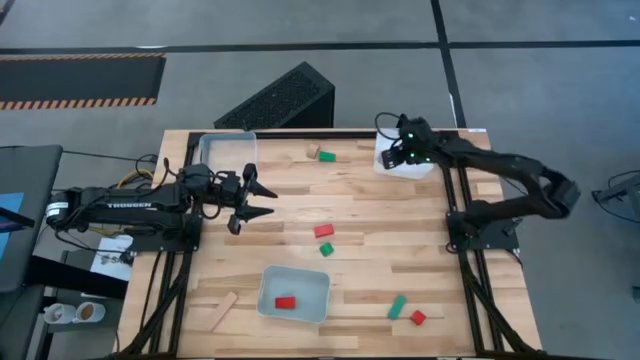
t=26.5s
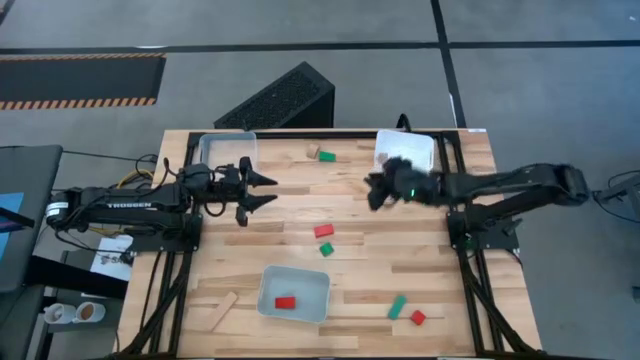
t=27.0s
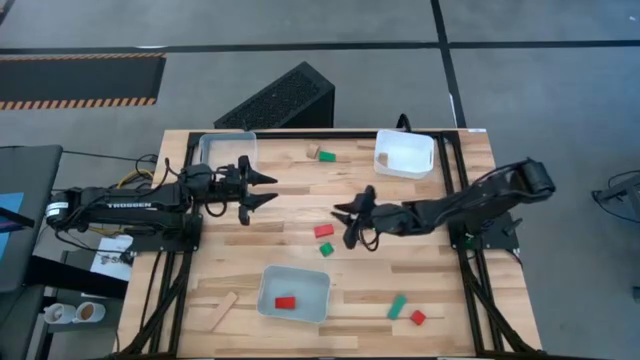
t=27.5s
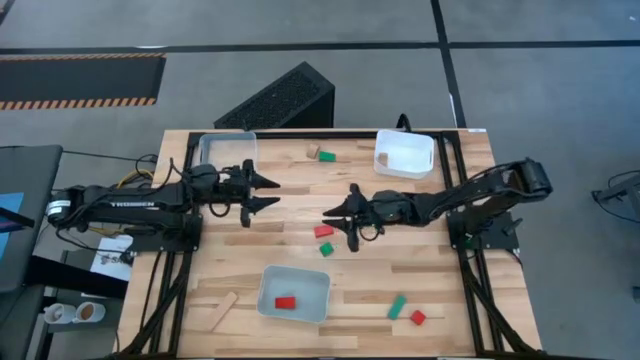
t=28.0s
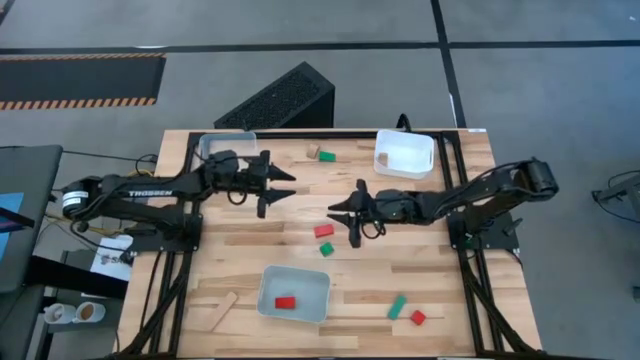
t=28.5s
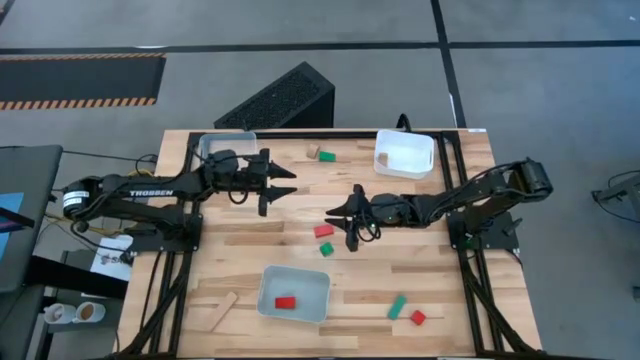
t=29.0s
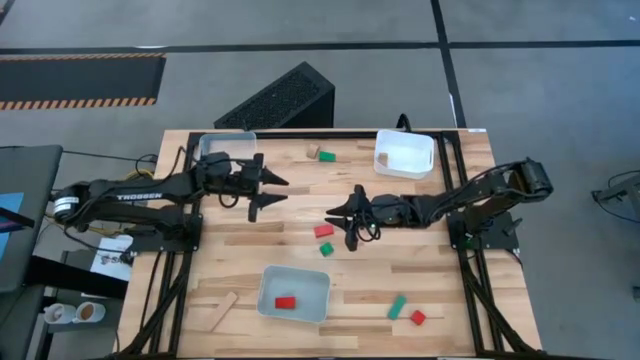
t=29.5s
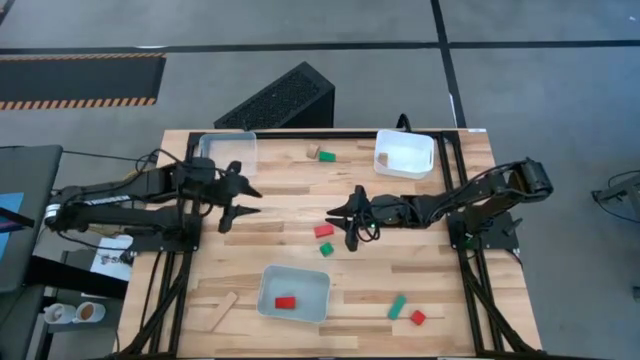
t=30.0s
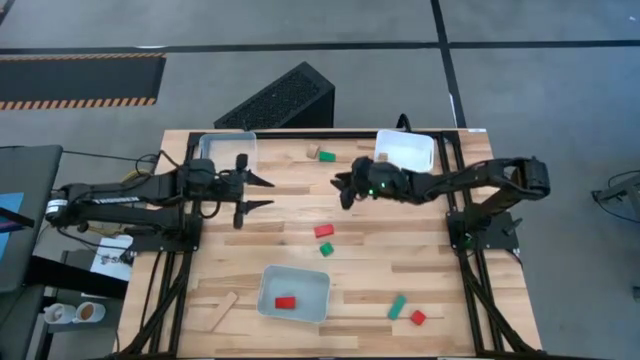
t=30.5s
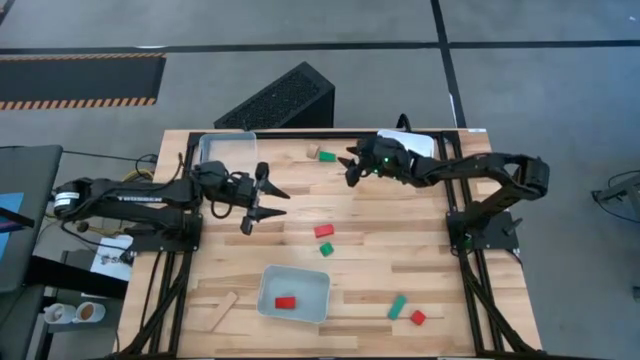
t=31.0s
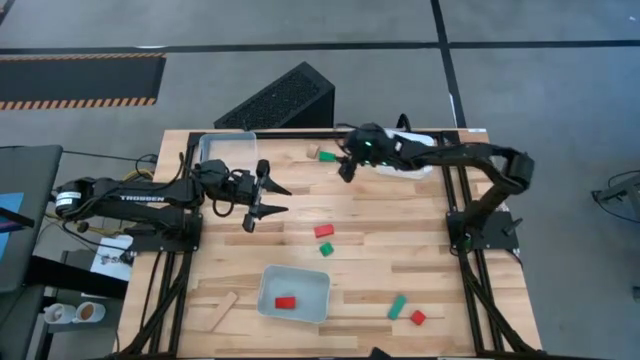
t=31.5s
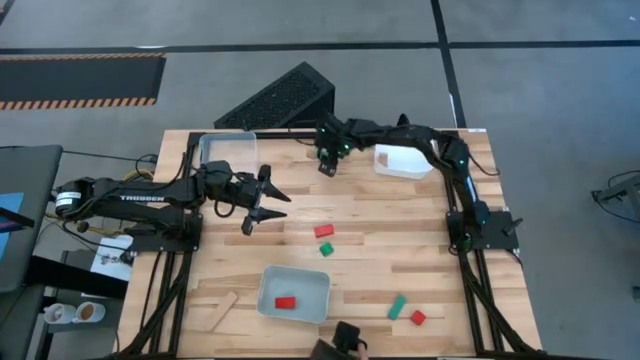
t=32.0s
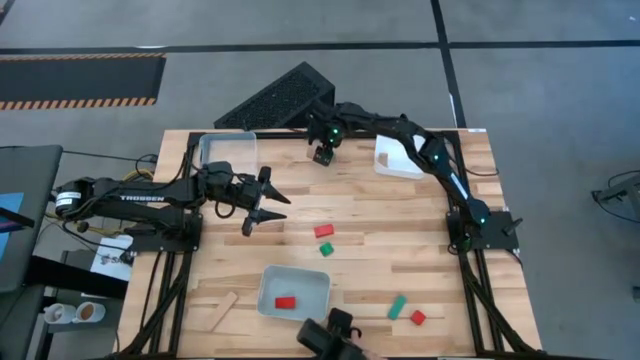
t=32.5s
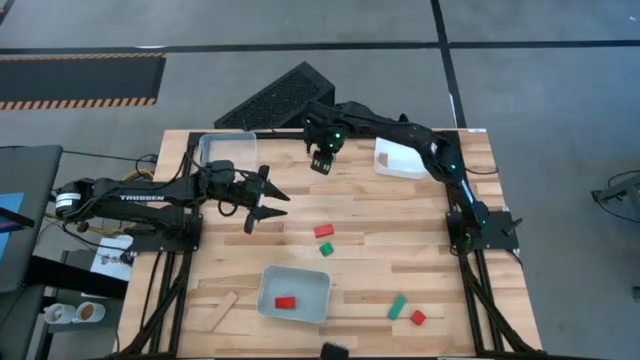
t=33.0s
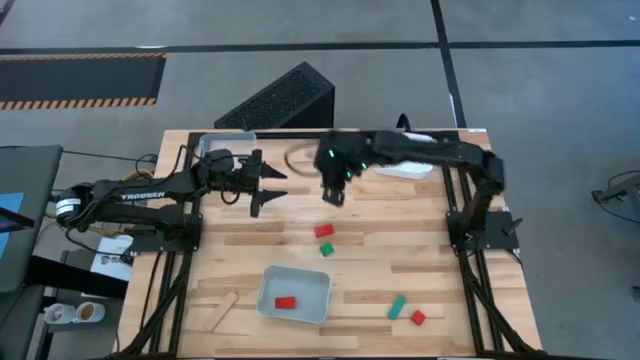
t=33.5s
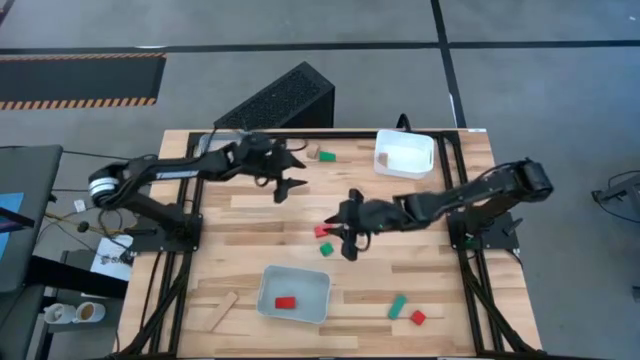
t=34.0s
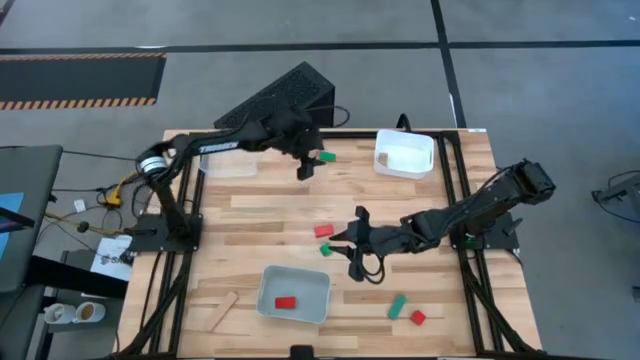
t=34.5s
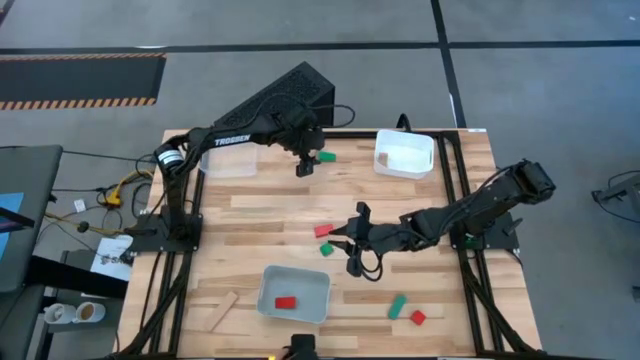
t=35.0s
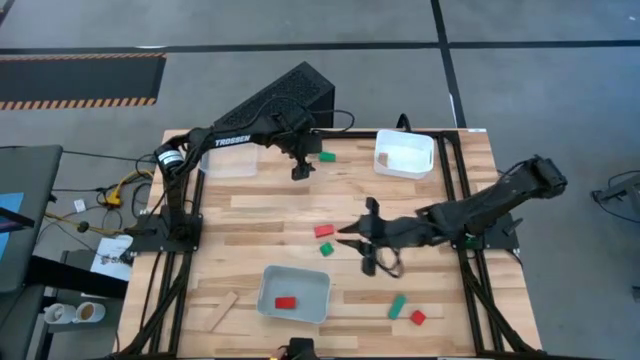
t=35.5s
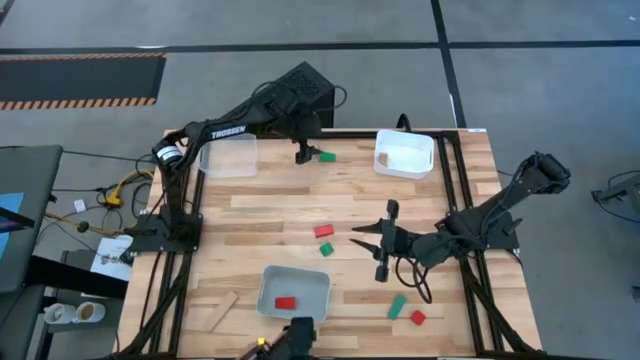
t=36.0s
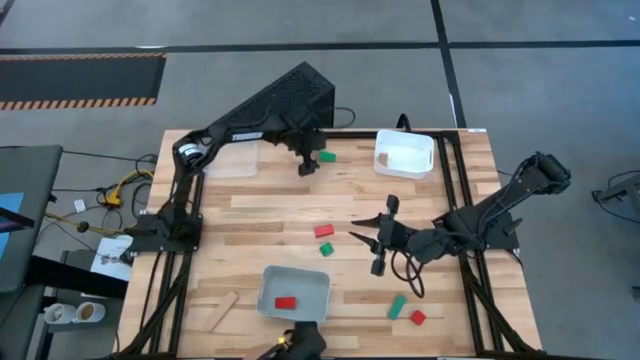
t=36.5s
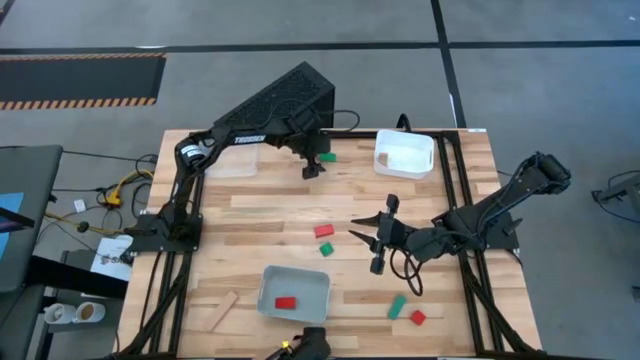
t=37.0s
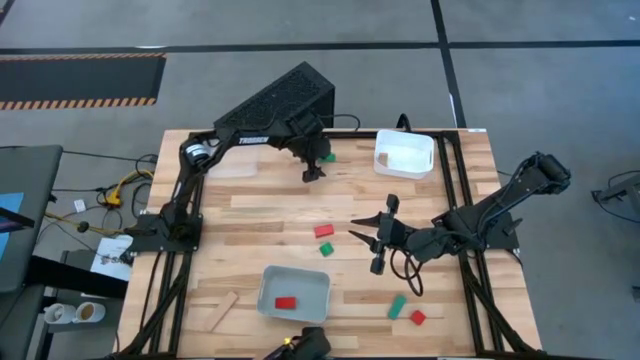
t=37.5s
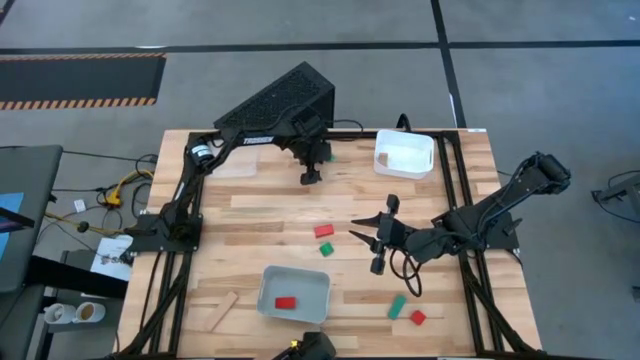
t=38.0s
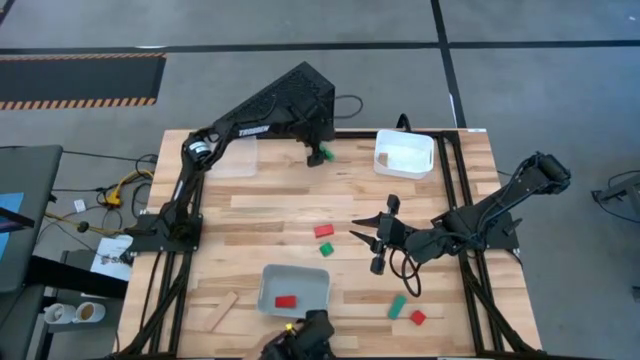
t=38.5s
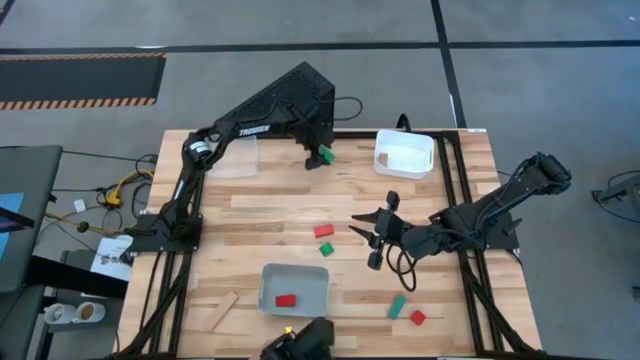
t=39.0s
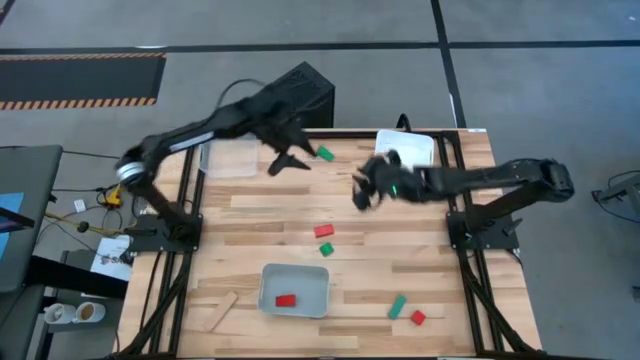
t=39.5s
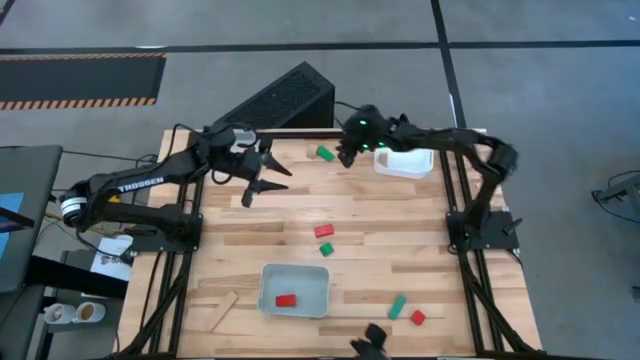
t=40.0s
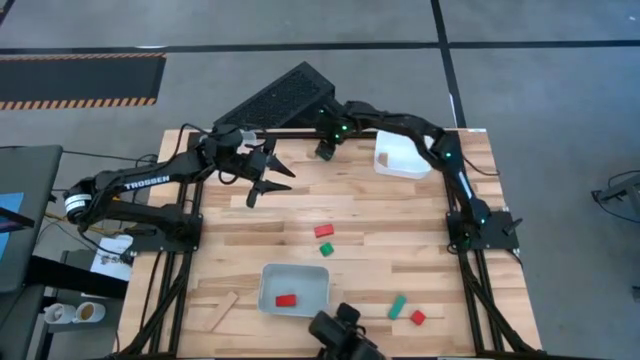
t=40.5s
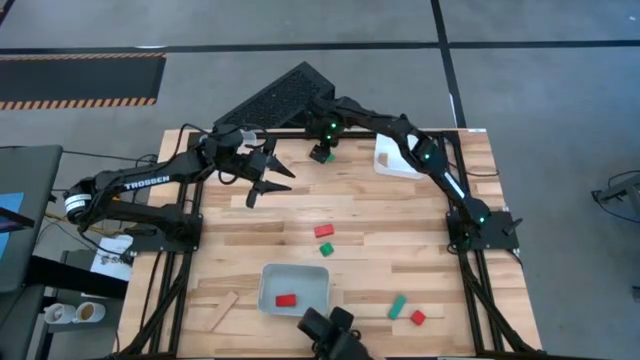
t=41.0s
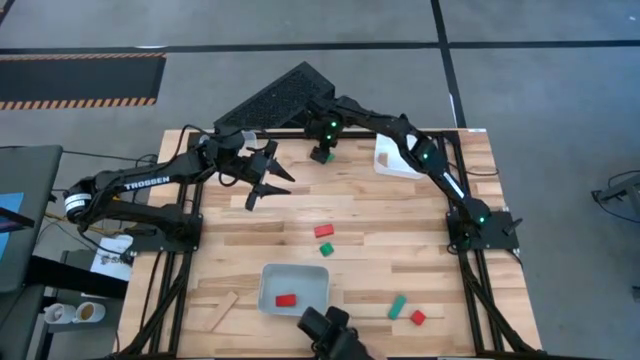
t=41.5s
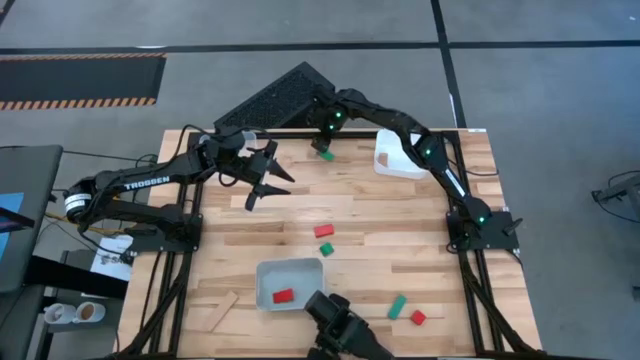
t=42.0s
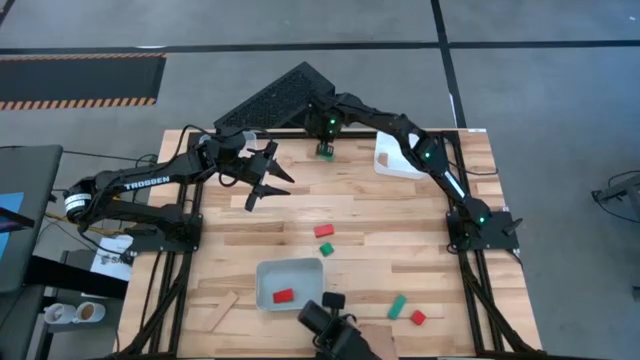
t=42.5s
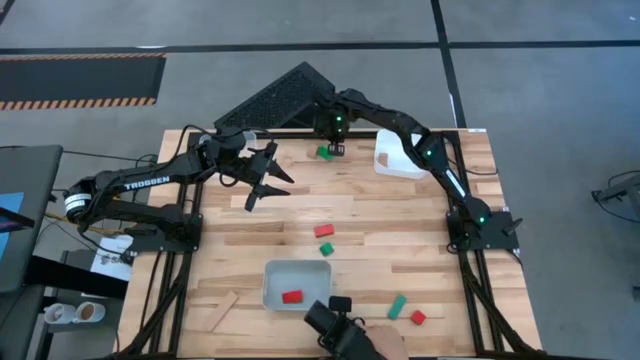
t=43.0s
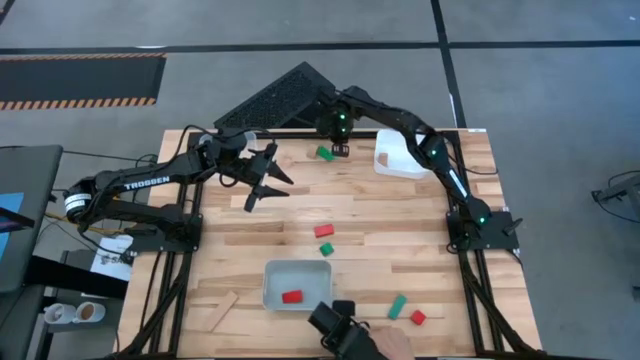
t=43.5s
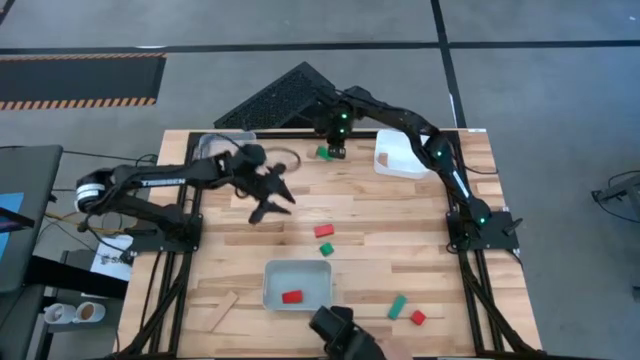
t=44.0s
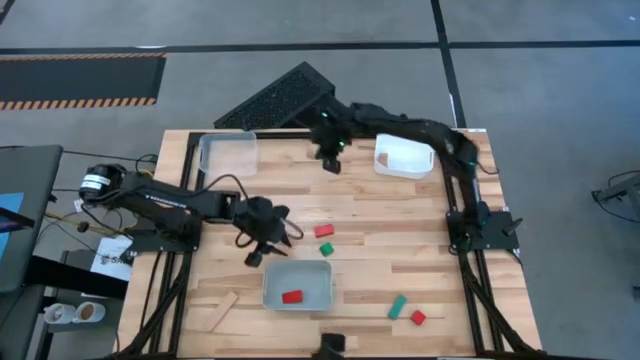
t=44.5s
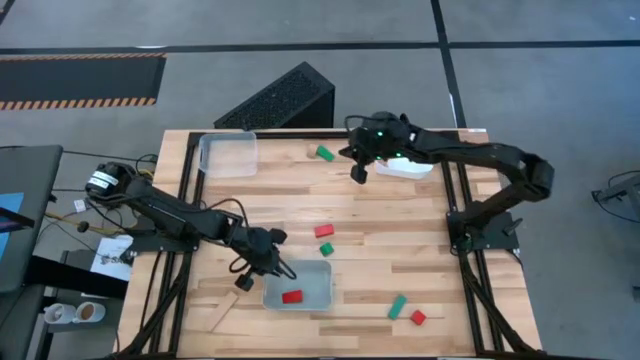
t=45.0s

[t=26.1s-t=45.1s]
Task: Sort & place blocks by color
Put the top green block into the transparent bin

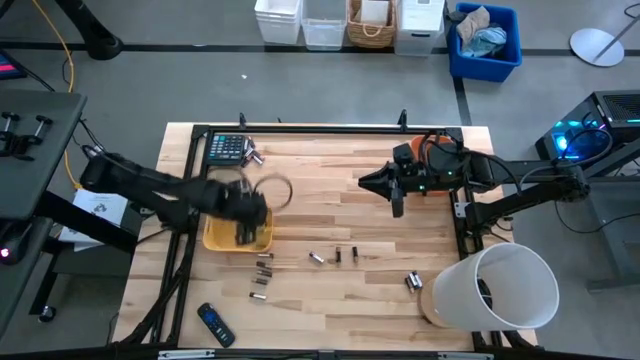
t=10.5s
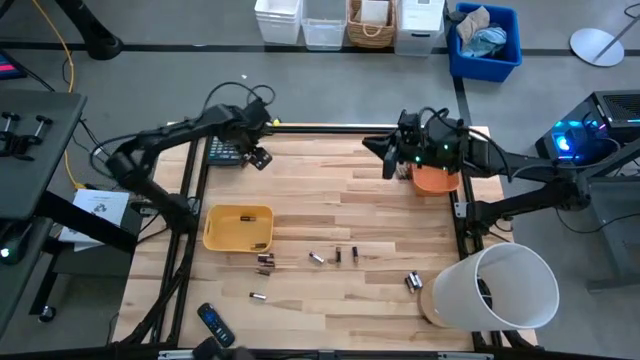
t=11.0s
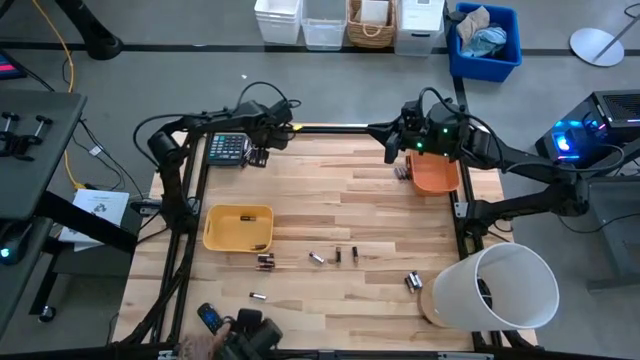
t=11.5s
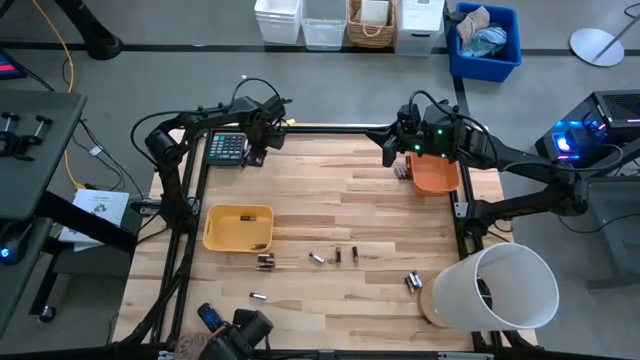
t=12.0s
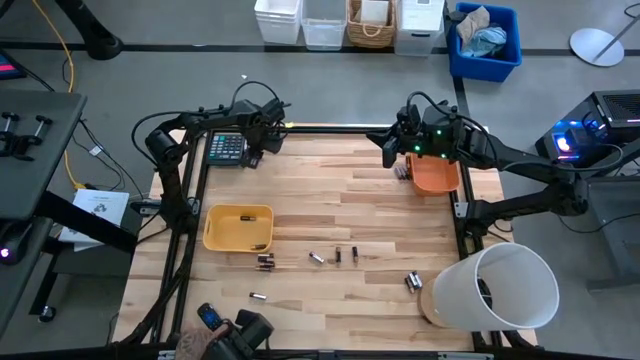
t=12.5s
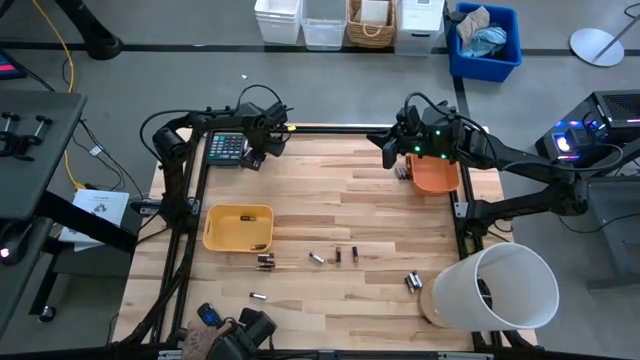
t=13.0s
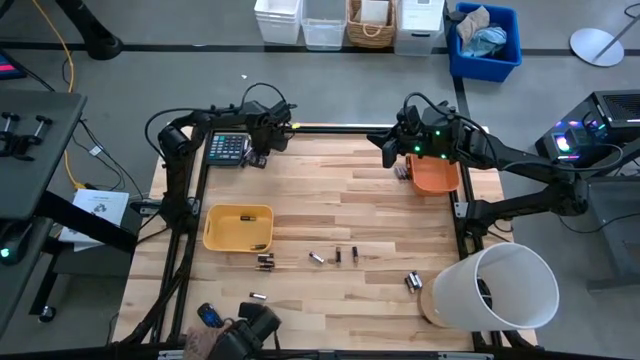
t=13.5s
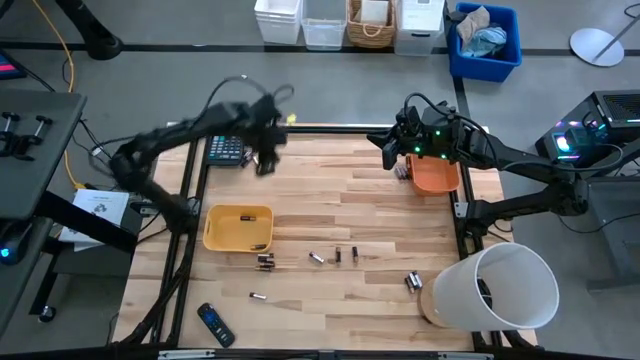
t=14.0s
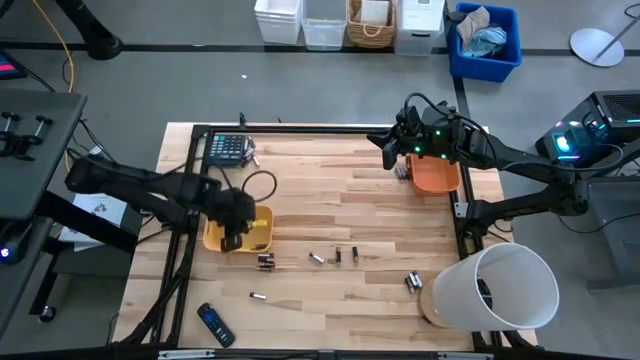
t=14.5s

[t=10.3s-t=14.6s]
Task: Sort batteries
Put the black battery into the yellow bin
